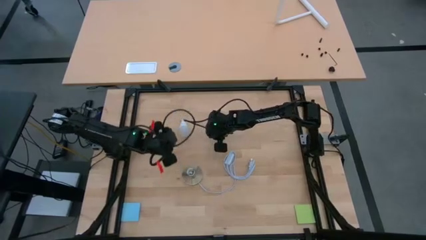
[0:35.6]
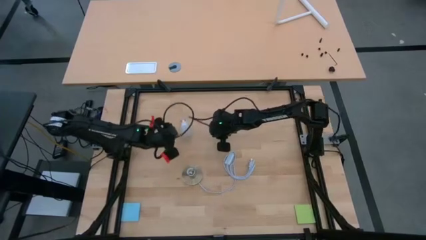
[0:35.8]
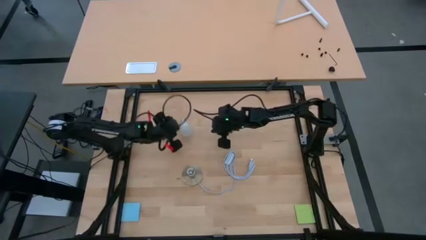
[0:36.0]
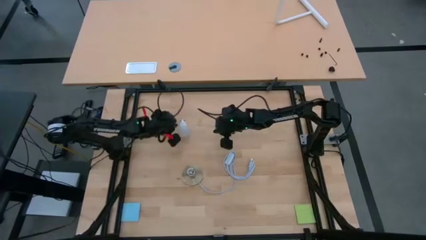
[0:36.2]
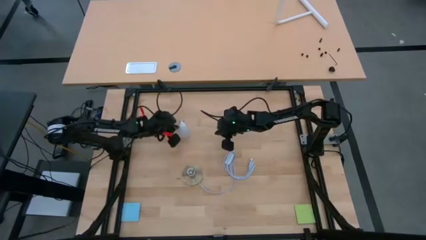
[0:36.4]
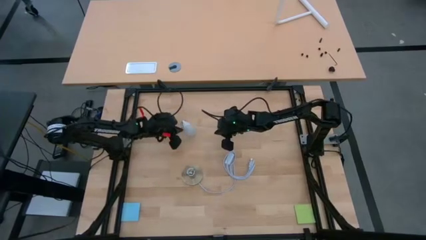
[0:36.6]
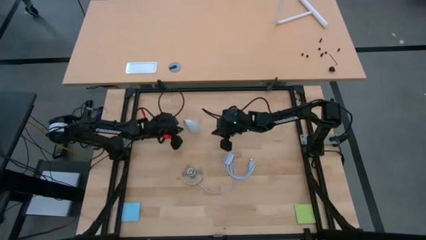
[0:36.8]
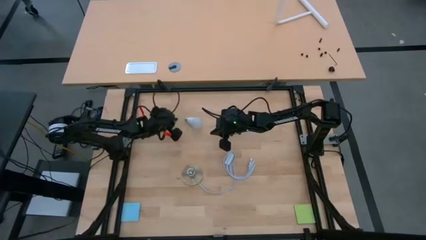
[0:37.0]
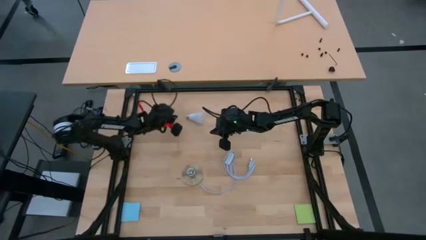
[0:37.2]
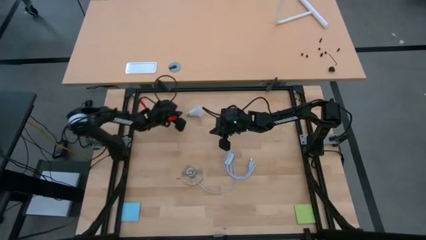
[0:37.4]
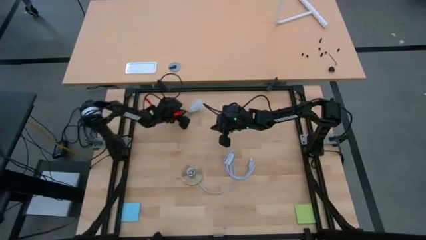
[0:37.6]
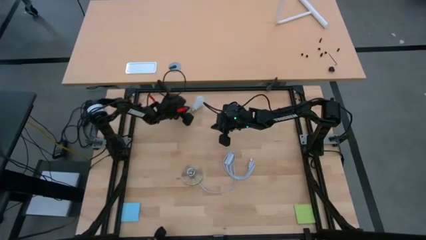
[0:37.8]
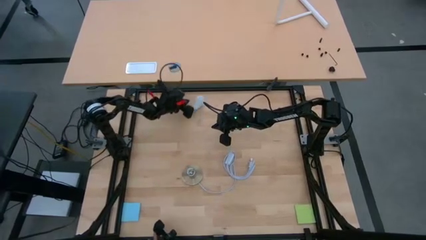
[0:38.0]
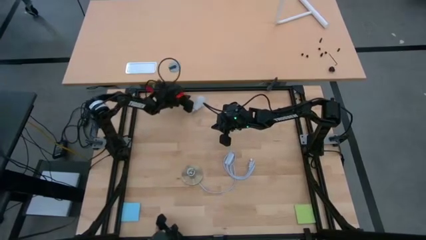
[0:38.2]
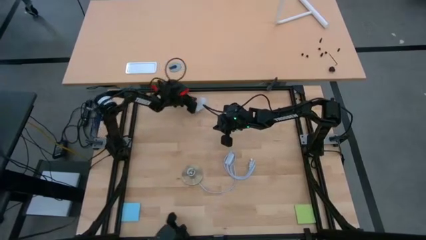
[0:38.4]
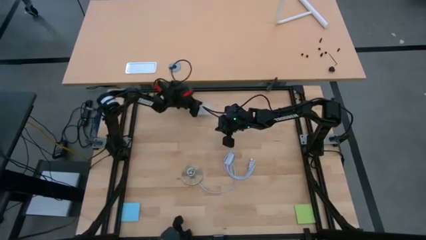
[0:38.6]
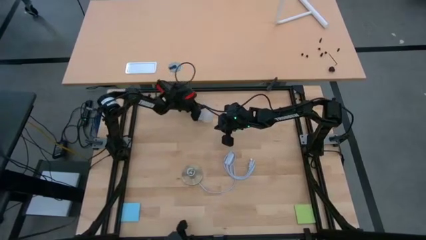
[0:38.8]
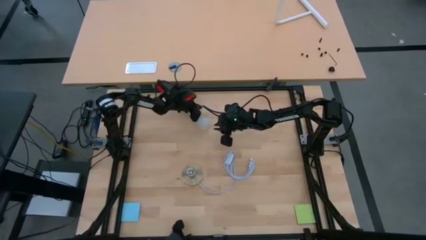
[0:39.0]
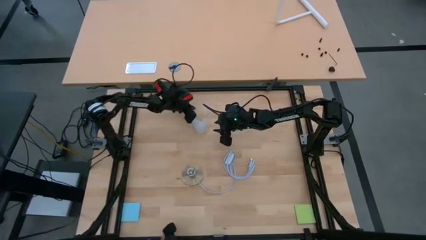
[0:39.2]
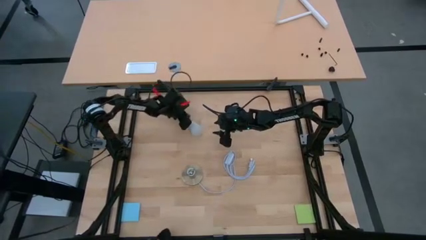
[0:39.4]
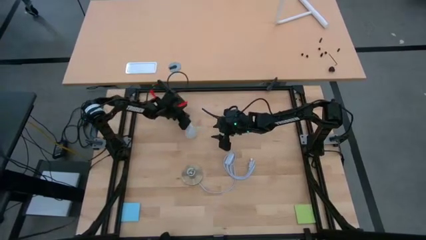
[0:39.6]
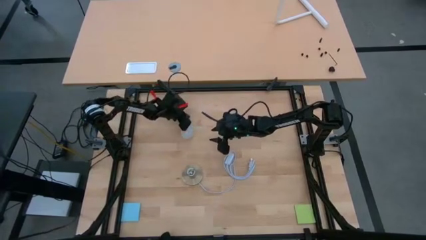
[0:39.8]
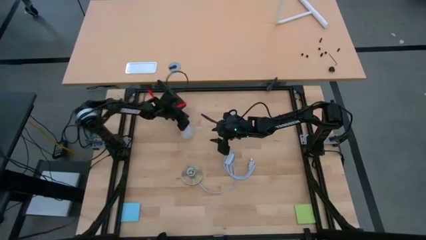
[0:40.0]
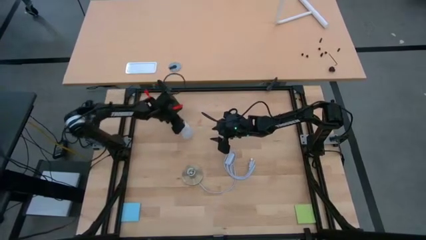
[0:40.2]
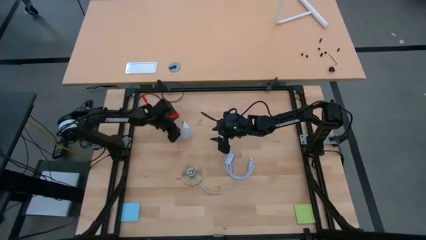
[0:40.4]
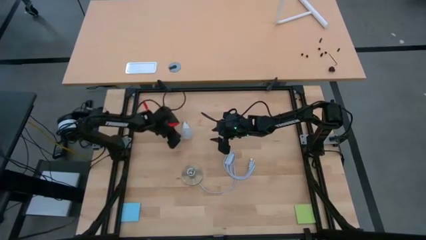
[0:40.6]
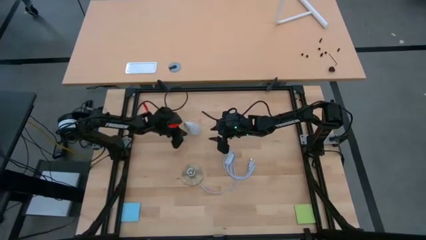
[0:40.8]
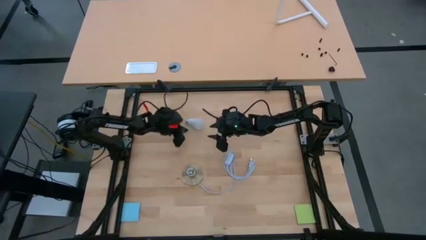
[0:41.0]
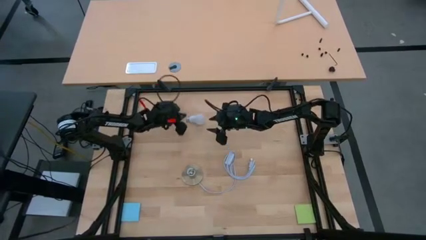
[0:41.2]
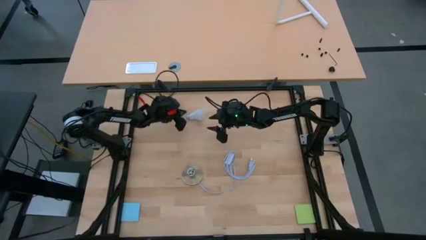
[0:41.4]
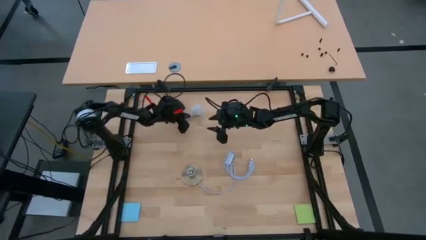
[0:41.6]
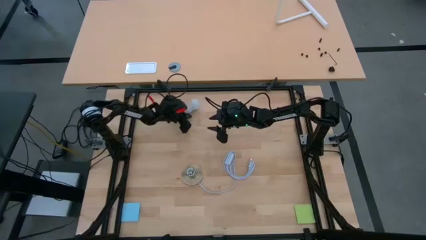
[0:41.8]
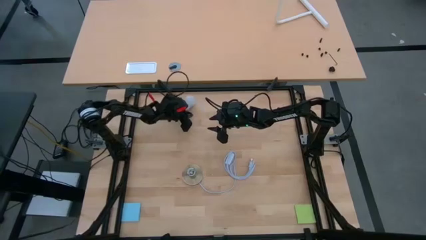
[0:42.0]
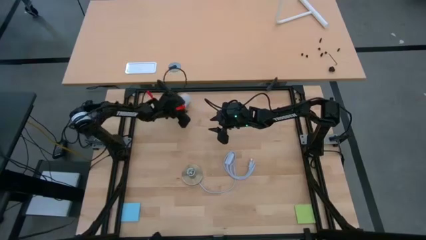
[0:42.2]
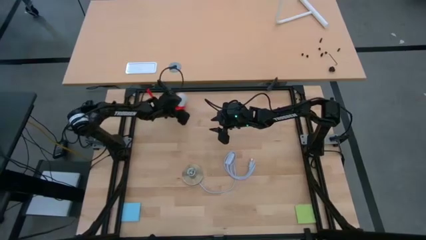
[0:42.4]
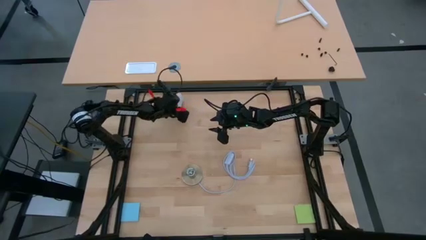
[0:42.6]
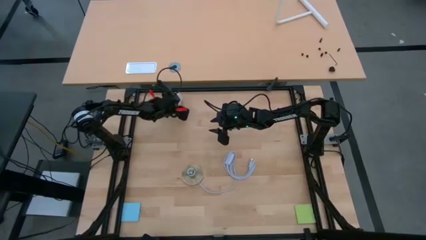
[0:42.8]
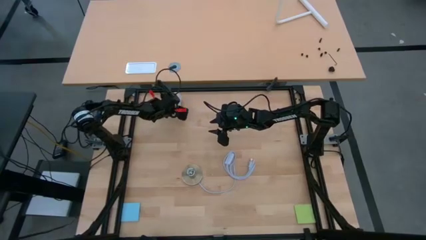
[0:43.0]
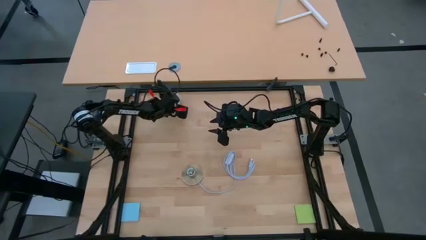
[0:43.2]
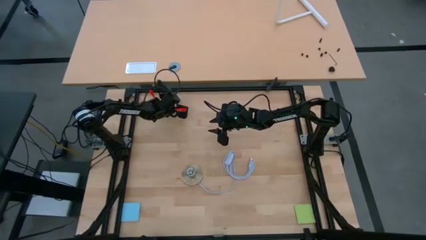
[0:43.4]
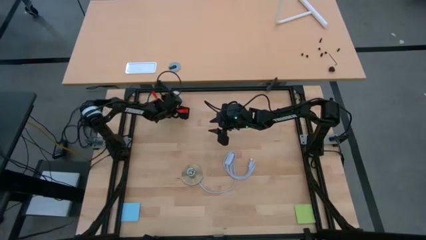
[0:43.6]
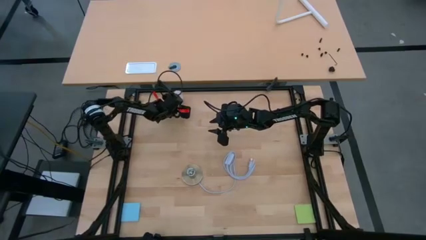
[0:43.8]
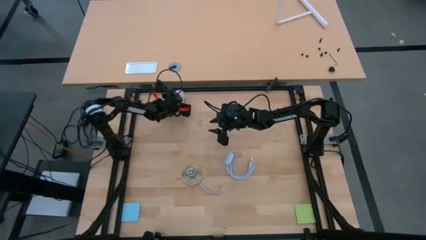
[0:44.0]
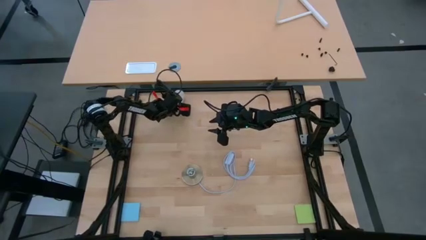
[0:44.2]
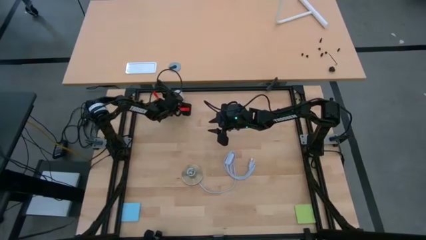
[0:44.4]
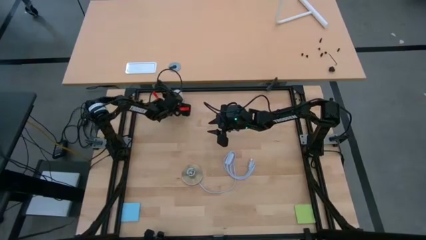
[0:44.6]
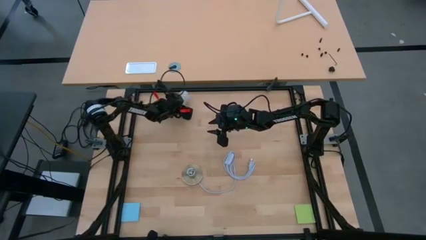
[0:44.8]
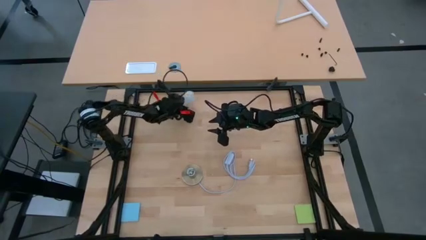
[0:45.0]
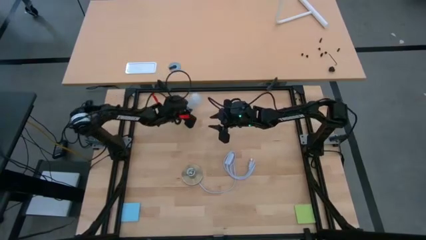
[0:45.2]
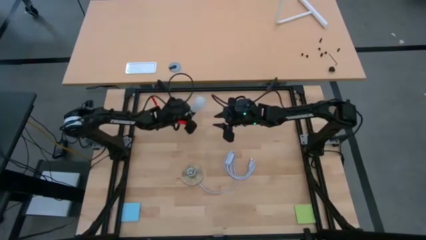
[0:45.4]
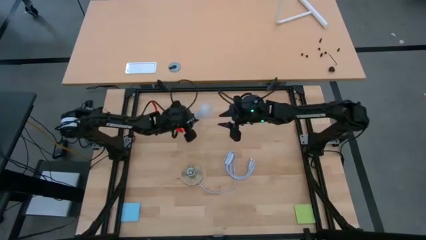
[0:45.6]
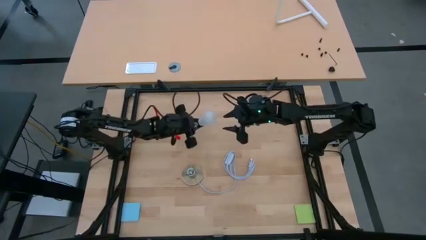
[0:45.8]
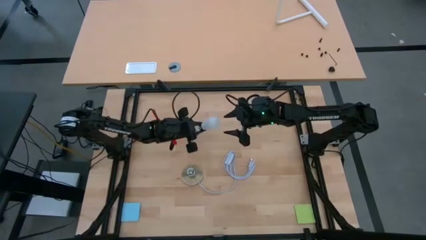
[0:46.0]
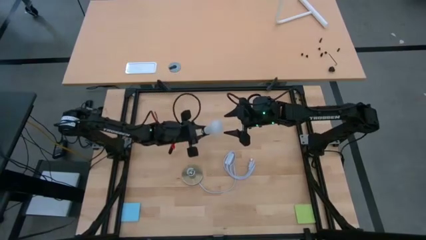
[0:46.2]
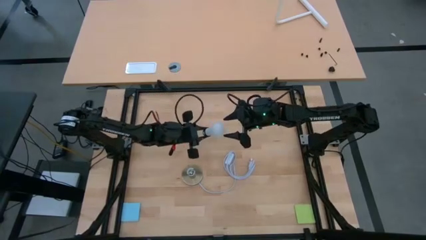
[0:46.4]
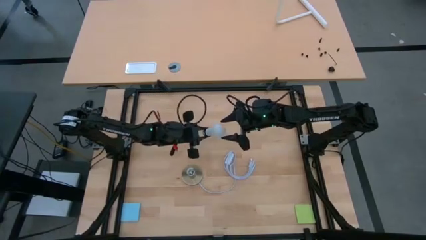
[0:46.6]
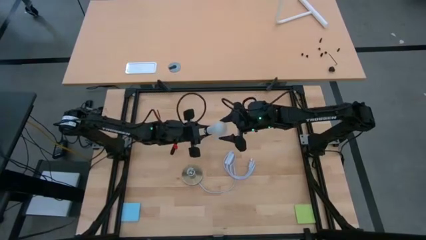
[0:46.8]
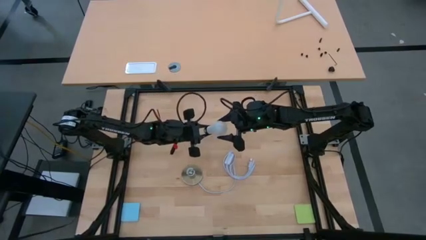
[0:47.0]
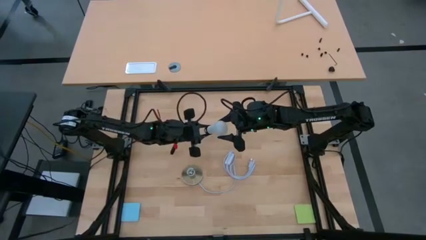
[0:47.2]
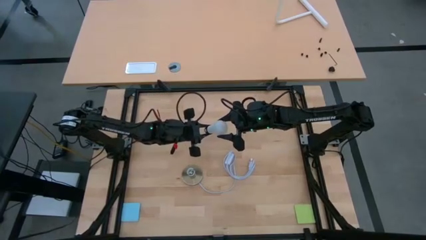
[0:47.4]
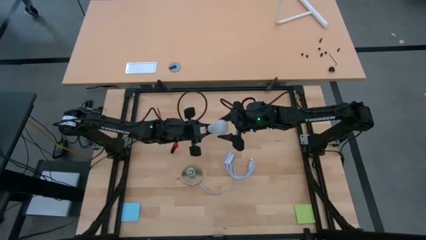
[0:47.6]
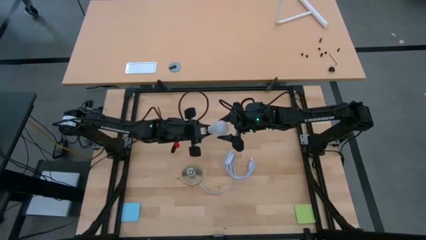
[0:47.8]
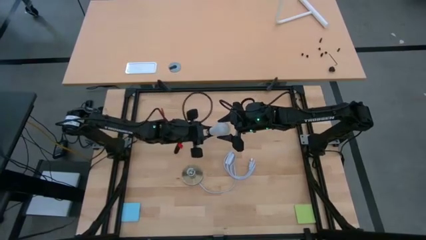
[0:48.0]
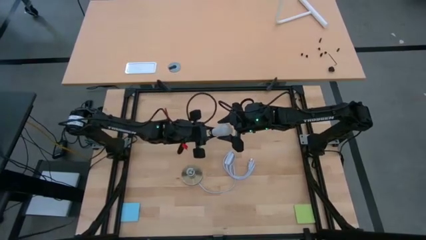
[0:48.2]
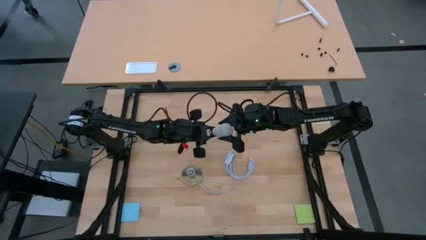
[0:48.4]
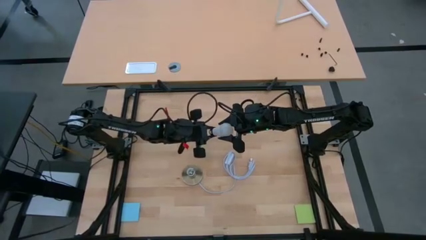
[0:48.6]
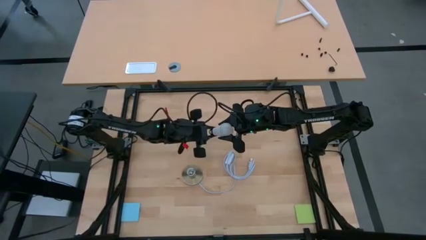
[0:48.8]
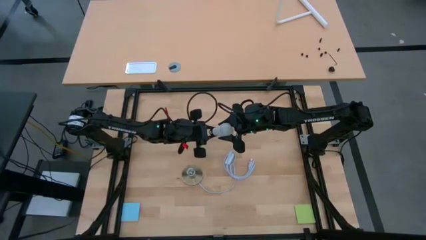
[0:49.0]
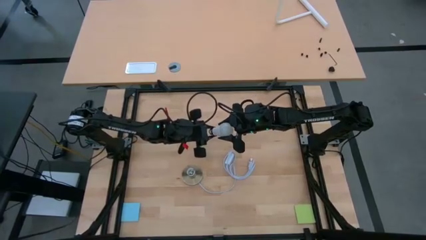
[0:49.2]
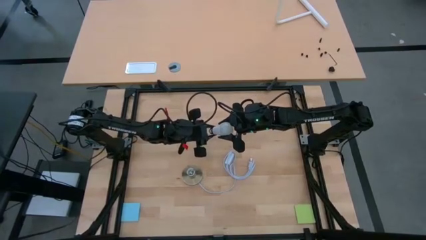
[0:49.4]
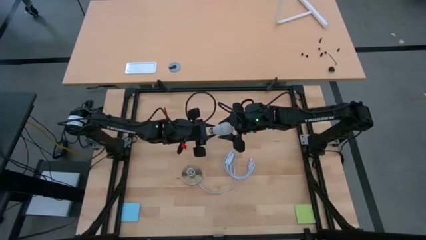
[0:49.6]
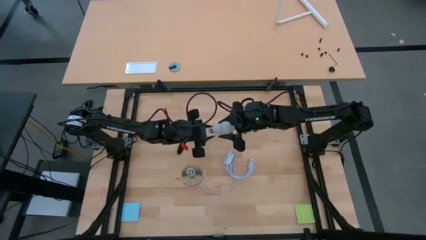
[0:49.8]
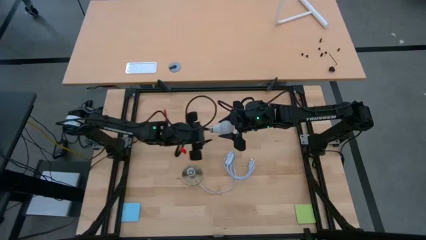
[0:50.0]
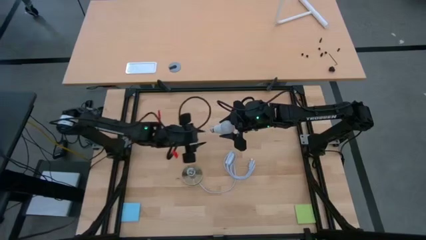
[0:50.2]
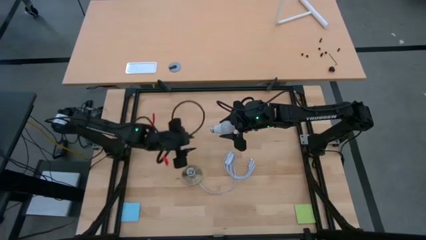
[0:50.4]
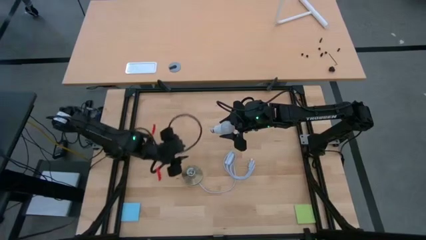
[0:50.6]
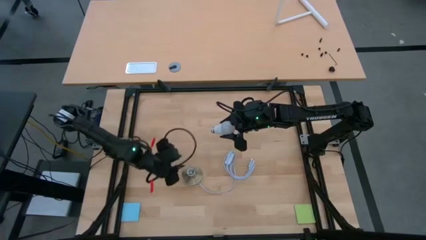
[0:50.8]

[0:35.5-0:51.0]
Task: Screw lightbulb
Insert the white lightbulb into the golden lamp

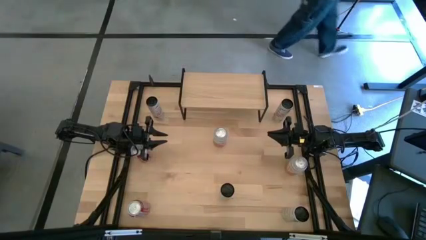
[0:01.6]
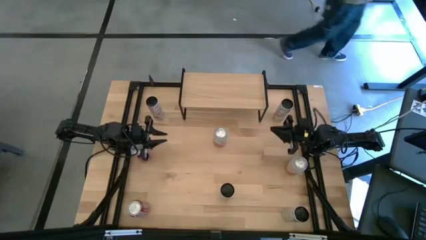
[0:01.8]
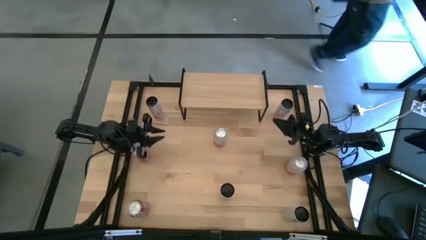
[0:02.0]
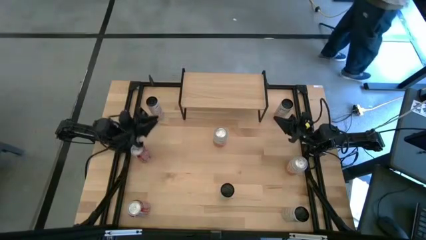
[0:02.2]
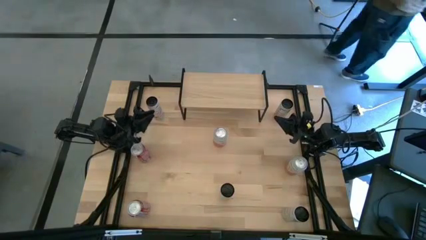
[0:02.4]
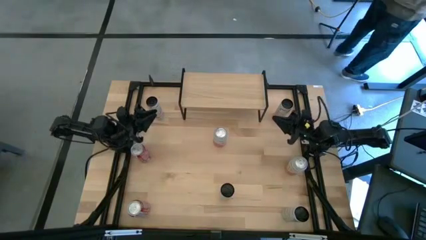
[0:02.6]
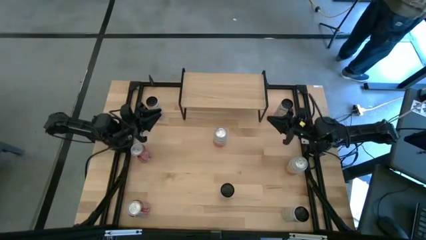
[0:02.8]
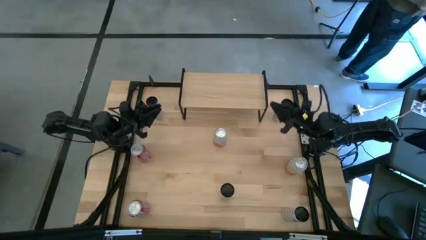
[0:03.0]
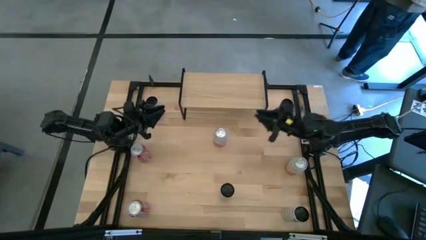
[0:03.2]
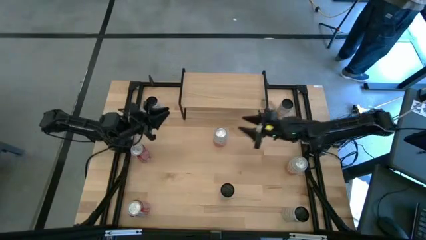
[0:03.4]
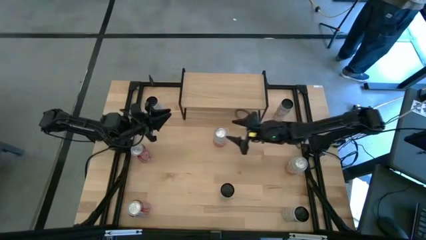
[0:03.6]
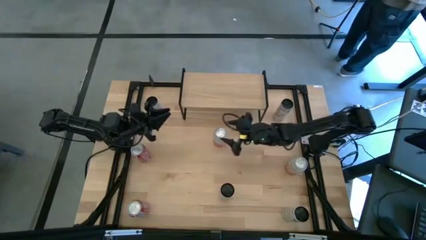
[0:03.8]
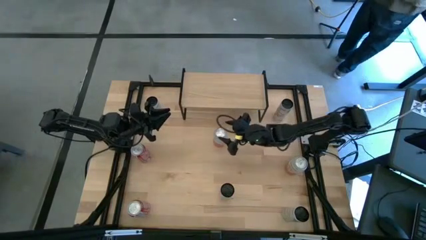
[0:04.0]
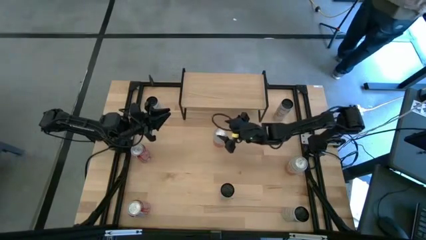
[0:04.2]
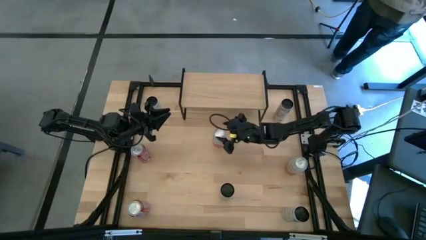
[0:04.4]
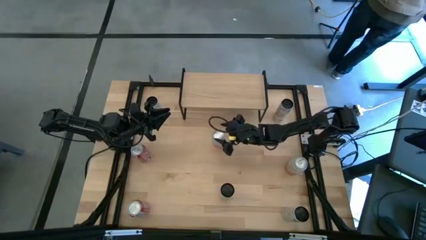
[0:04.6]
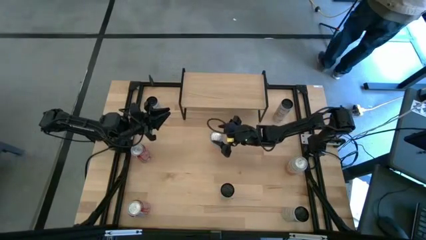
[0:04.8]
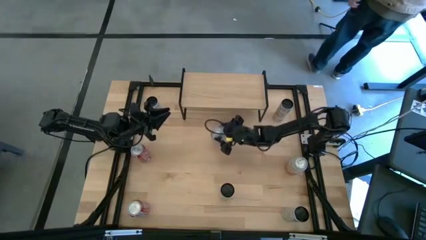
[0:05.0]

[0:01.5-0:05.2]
Task: Place canned beverage on shelf
Put the left orange white soda can on the shelf
